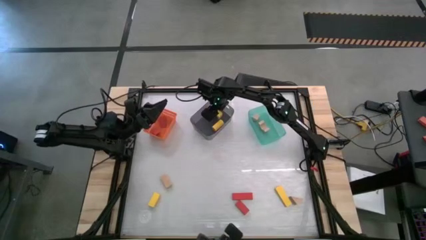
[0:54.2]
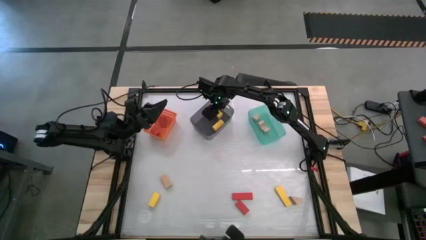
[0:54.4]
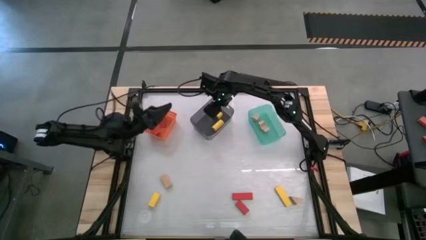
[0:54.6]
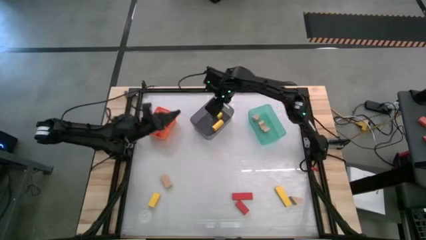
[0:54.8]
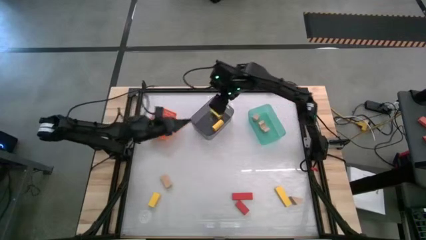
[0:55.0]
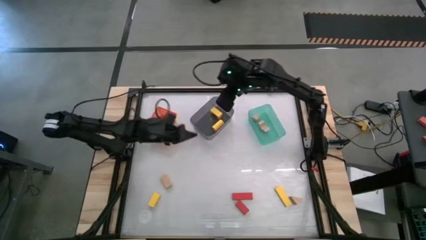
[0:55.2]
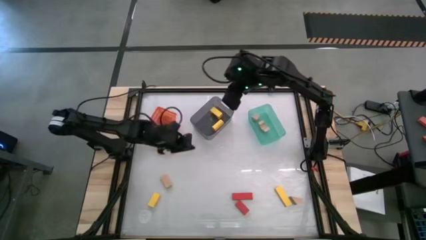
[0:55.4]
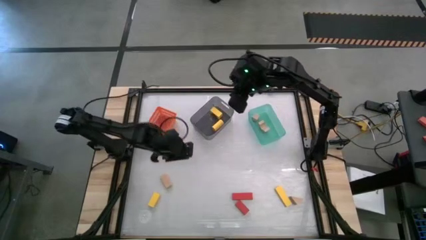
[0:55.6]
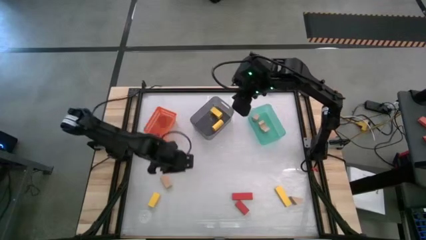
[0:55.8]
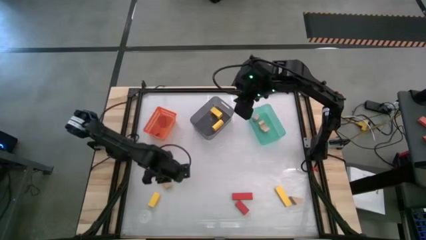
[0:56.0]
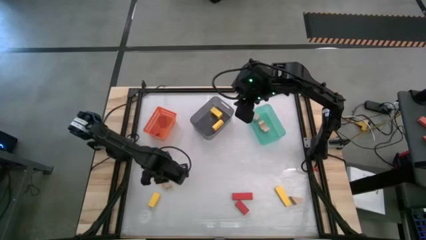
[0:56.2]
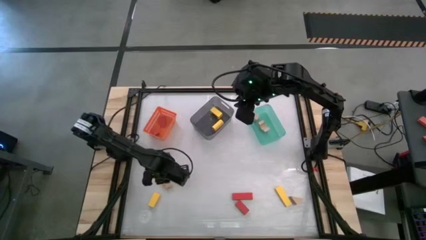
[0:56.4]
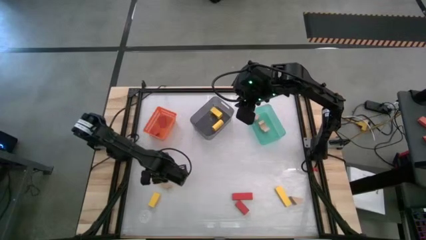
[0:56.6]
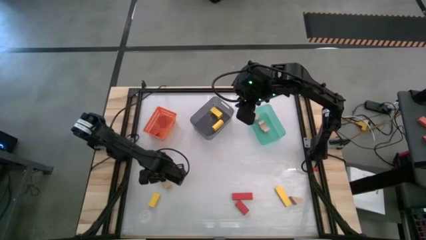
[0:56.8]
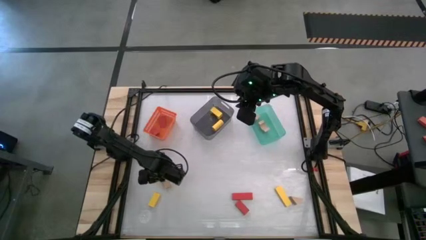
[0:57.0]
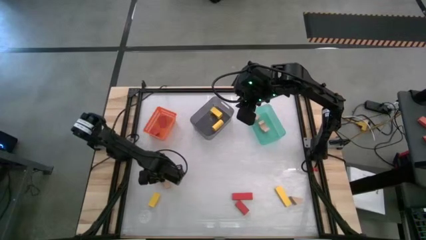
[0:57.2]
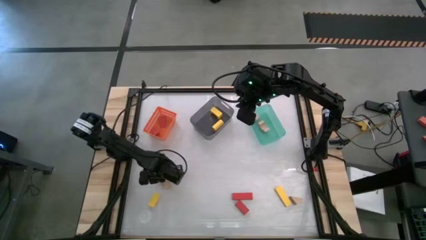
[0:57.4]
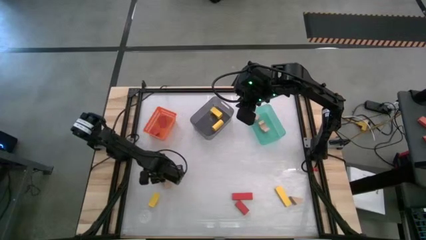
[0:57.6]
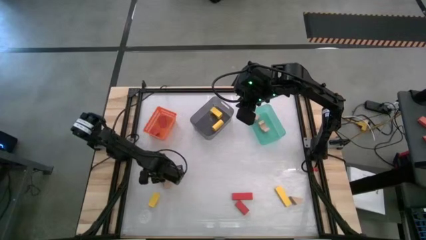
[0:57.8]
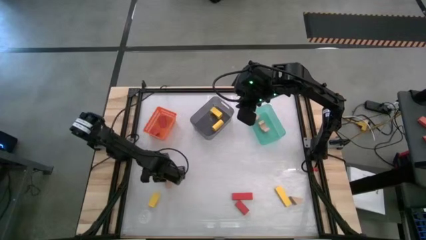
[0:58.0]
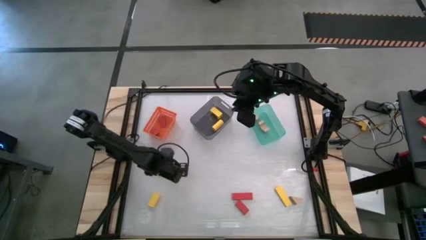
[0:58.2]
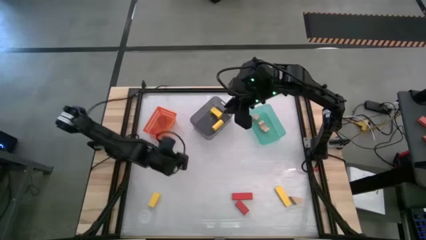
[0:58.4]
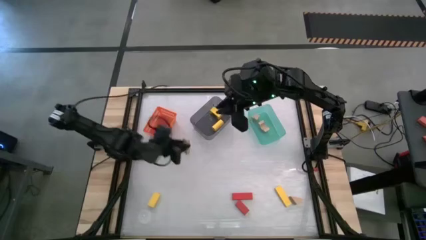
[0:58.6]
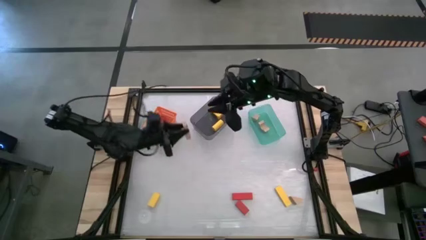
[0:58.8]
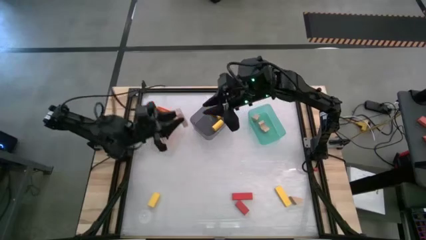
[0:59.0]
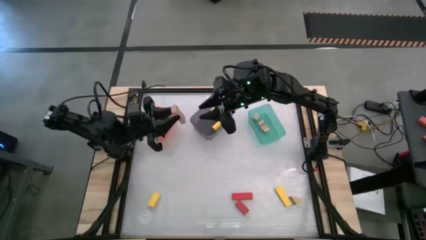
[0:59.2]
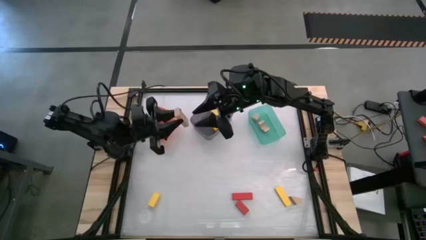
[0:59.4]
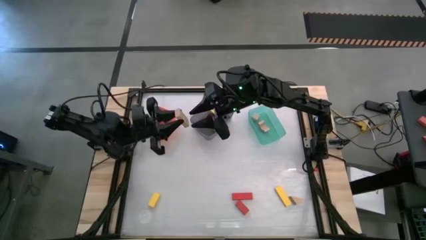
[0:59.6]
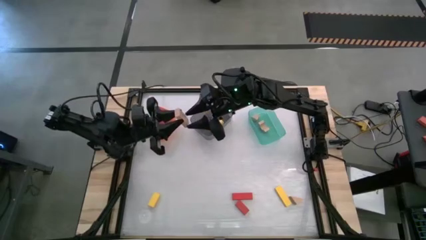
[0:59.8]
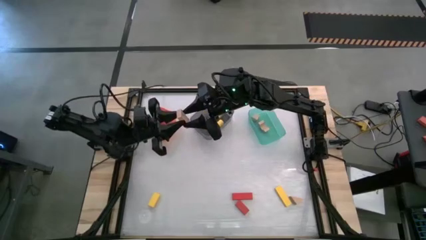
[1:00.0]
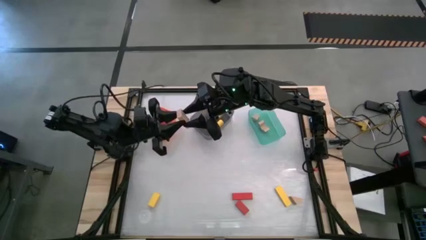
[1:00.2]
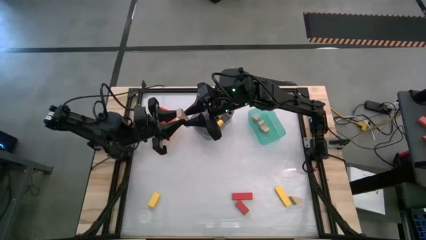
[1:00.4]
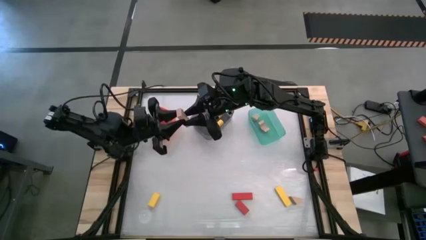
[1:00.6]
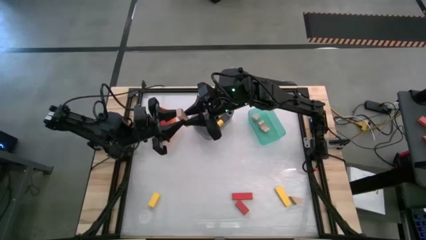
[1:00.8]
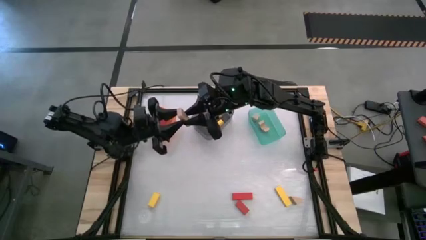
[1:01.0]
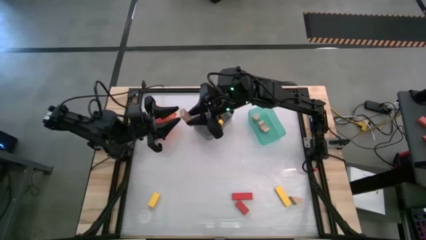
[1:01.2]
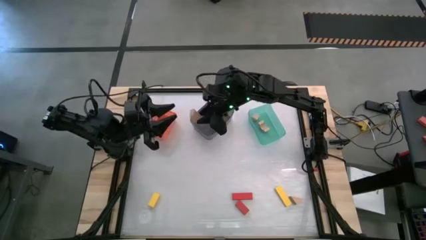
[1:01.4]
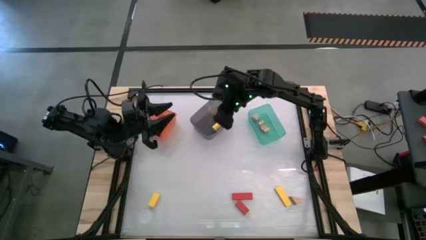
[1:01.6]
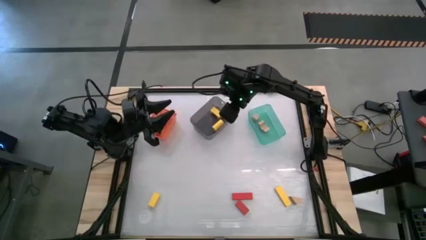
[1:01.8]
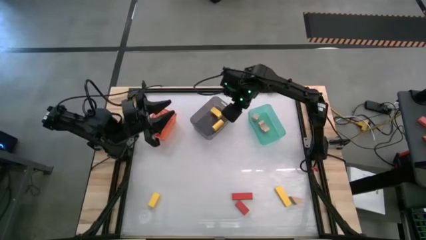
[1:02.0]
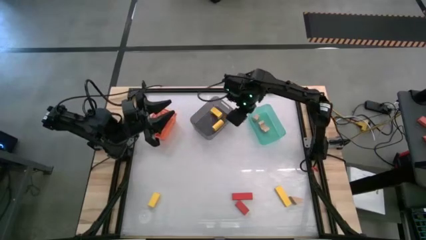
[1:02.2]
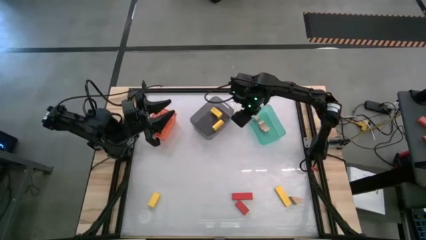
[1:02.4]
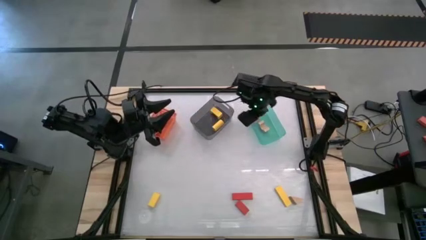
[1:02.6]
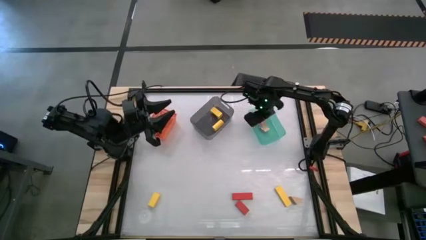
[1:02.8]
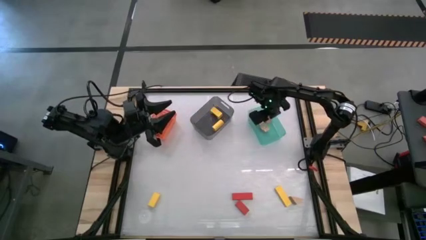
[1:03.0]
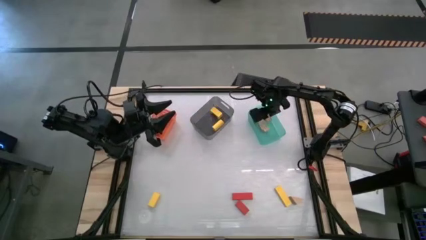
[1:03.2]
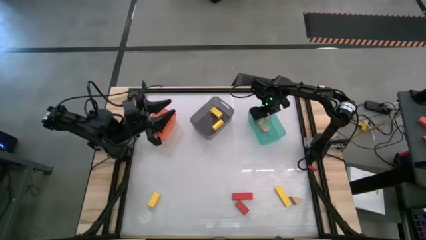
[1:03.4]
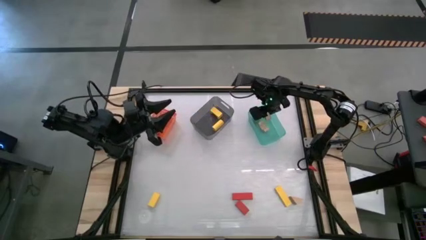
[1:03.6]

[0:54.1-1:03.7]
Task: Sort & place blocks by color
Put the brown block into the blue bin

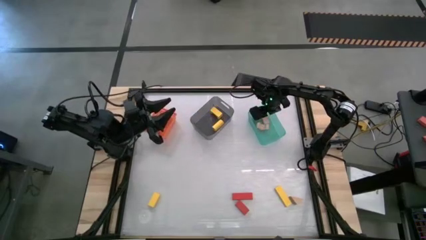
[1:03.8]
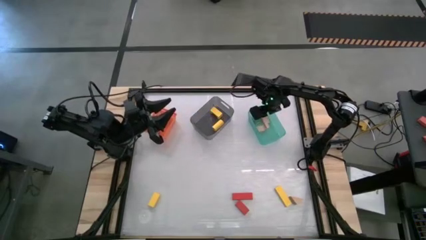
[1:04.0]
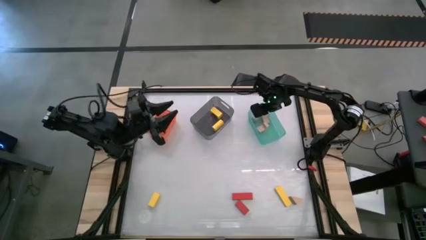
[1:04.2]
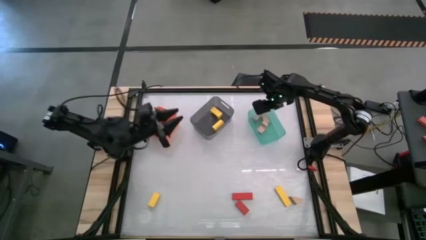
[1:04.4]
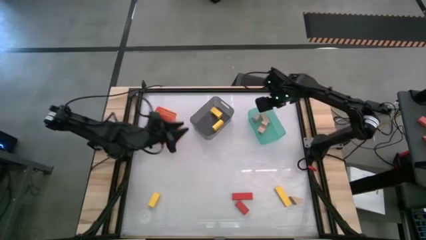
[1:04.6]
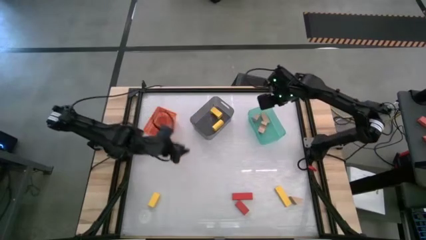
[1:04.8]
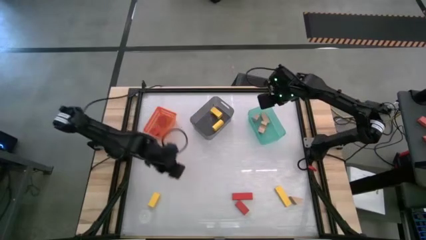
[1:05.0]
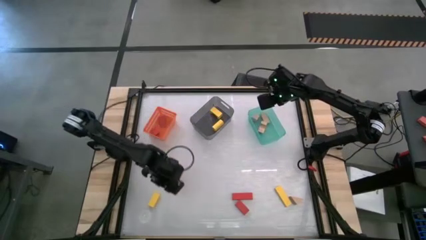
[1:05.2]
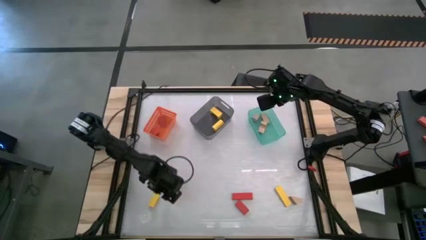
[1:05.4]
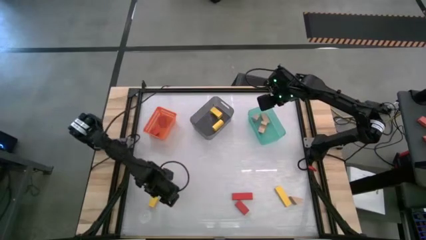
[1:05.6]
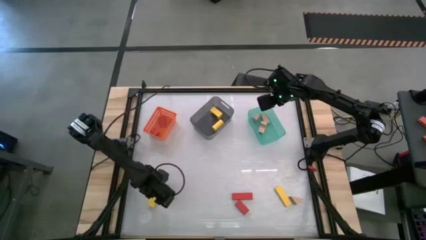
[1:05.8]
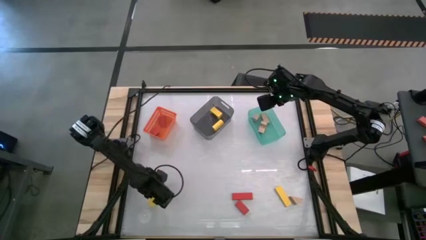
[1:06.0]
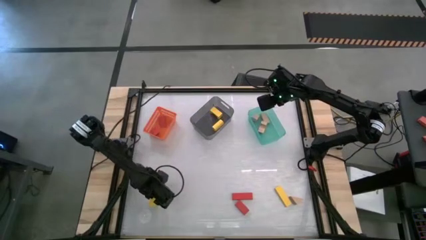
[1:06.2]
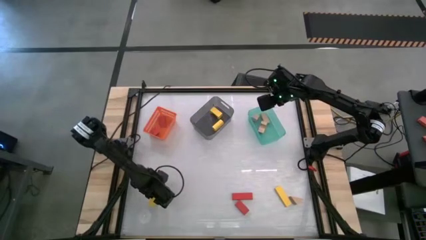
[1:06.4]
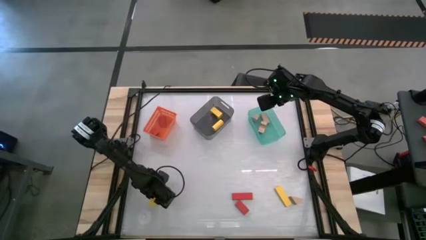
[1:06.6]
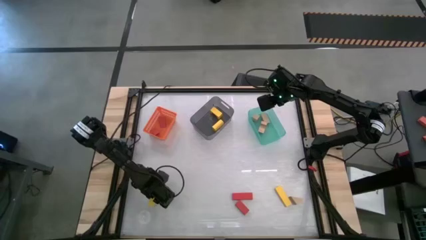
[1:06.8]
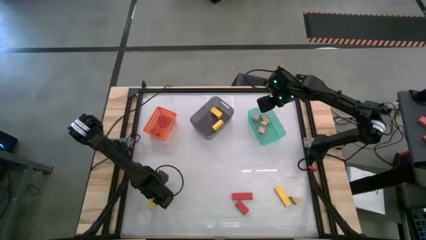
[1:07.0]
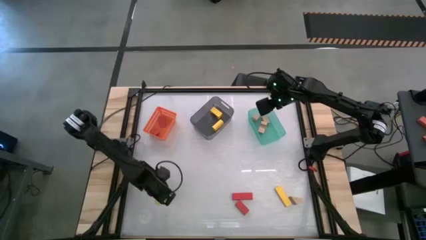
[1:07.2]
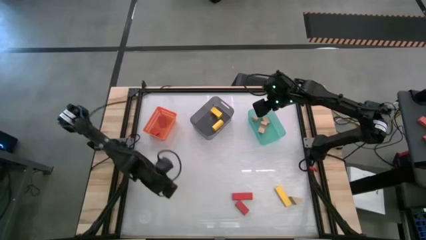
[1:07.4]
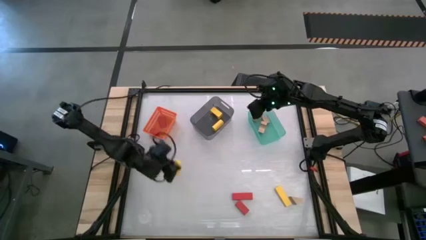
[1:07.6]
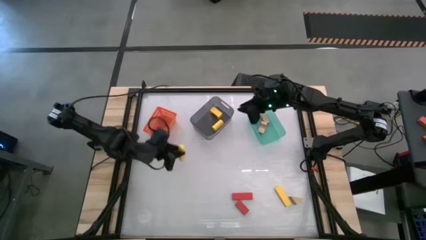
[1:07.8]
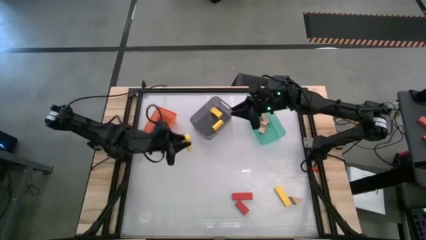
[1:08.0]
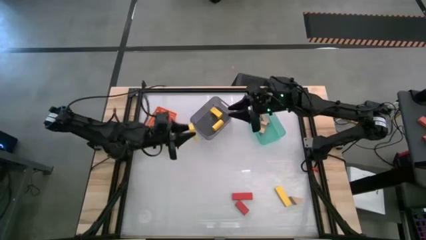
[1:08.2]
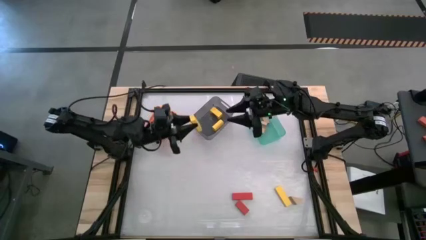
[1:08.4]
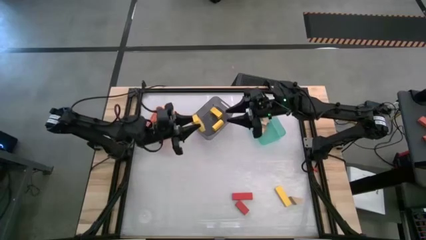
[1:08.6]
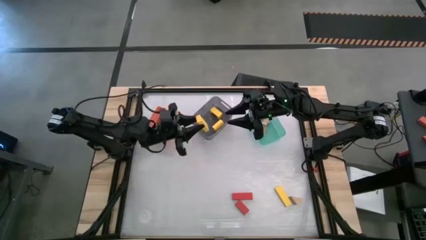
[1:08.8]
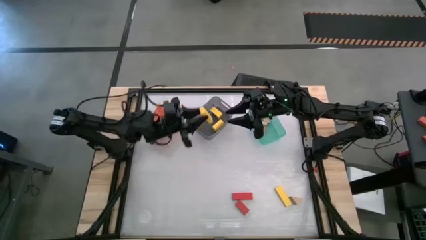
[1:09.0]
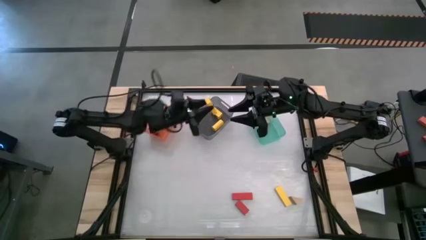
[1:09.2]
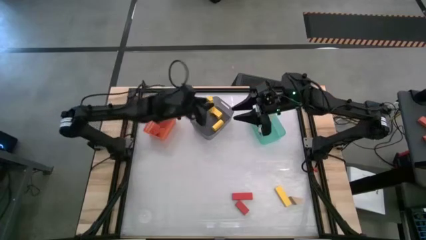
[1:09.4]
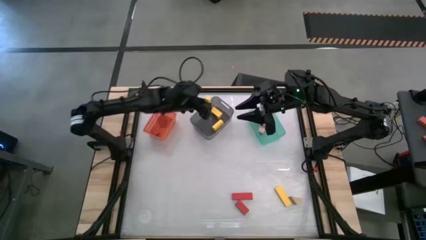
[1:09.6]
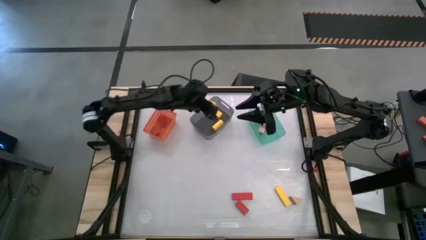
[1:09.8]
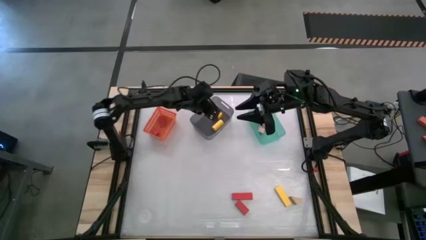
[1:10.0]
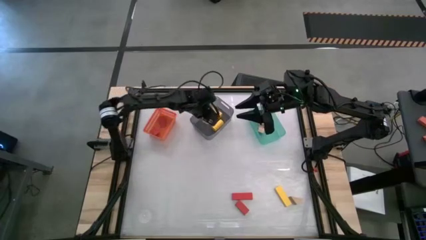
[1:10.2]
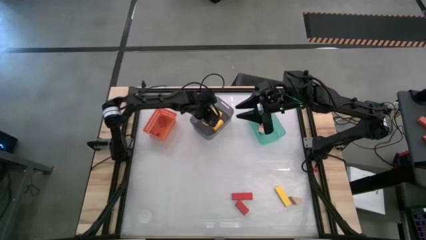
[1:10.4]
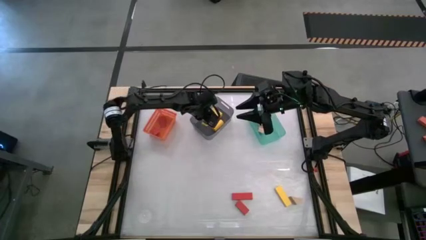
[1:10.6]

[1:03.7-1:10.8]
Put the yellow block into the black bin
